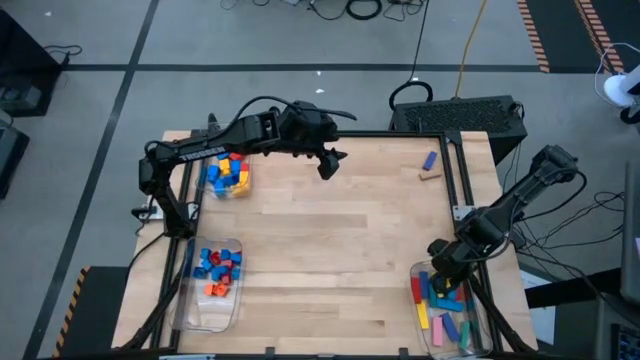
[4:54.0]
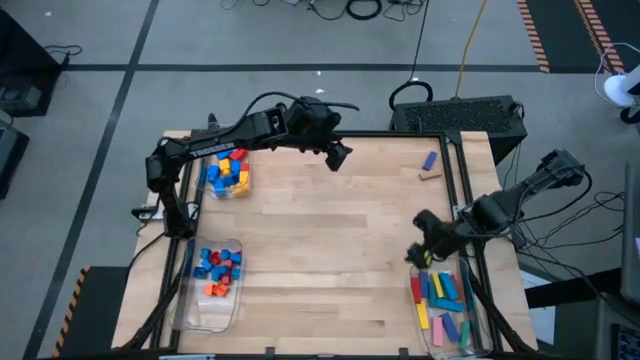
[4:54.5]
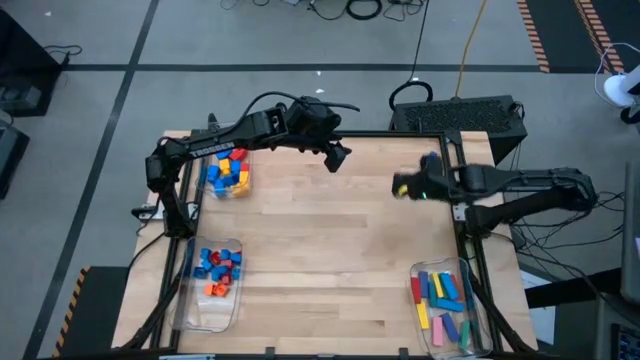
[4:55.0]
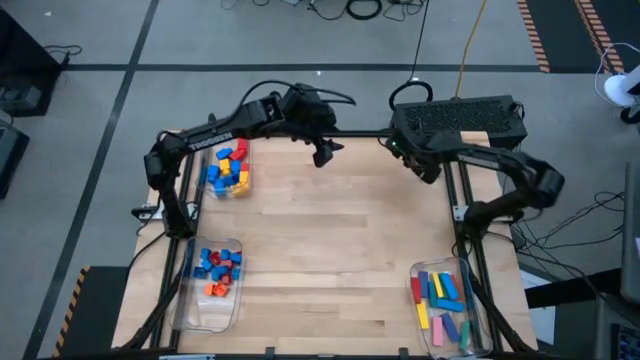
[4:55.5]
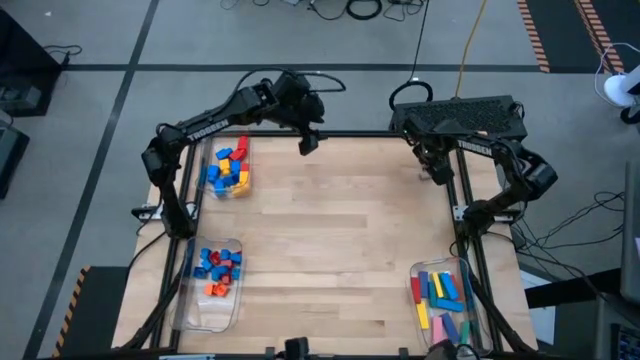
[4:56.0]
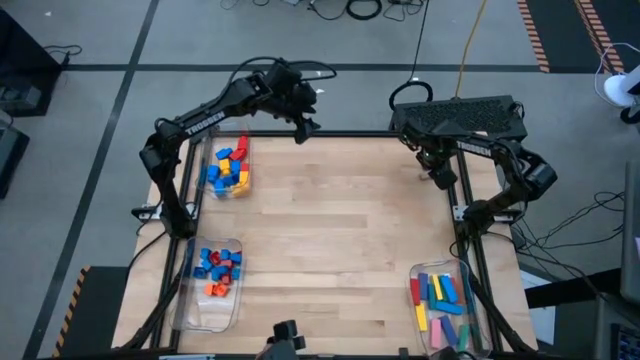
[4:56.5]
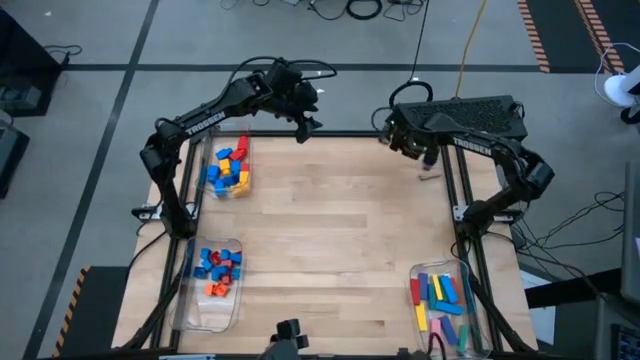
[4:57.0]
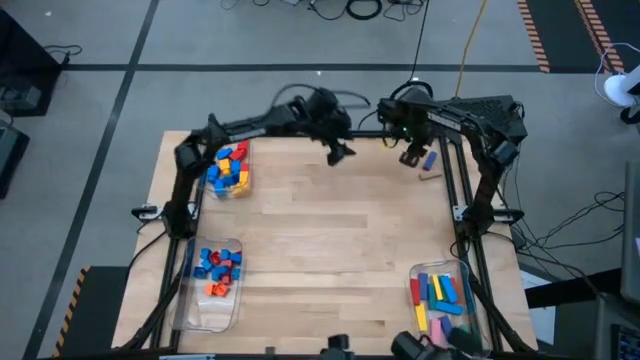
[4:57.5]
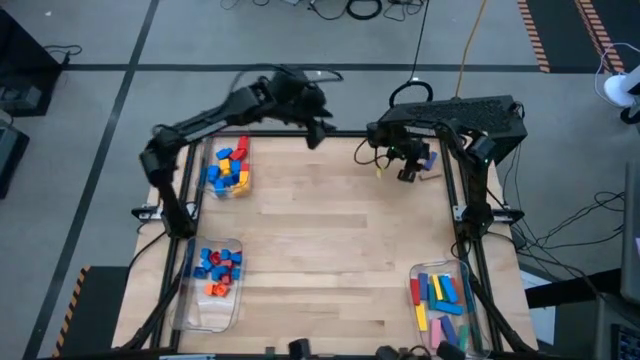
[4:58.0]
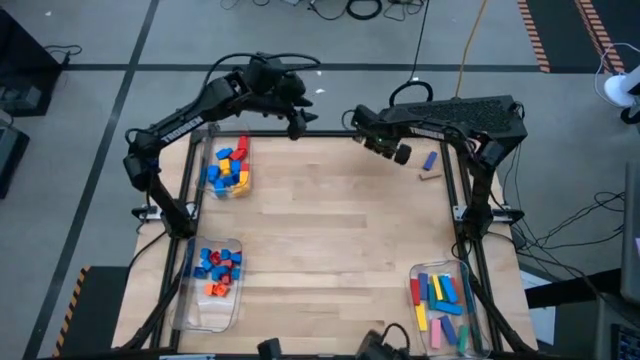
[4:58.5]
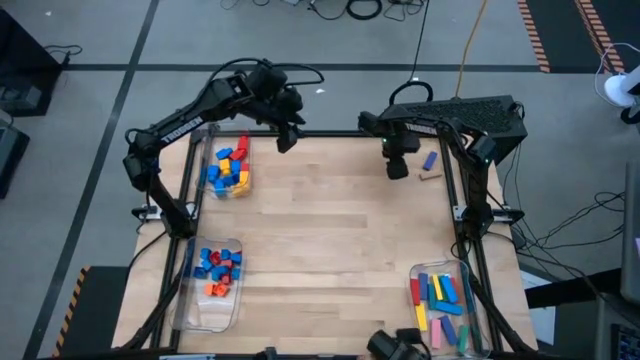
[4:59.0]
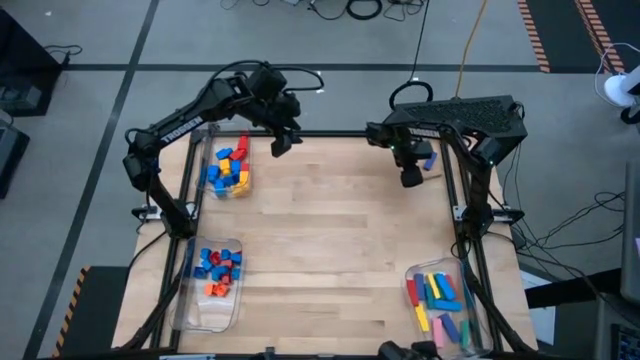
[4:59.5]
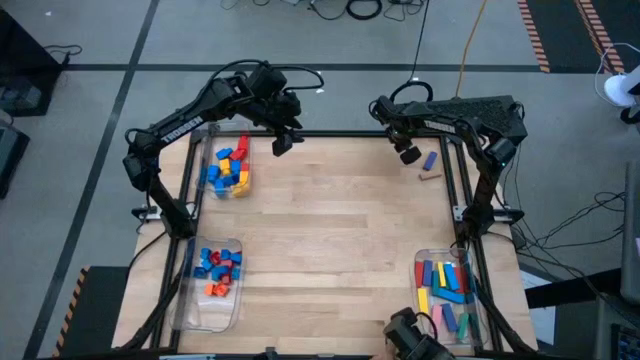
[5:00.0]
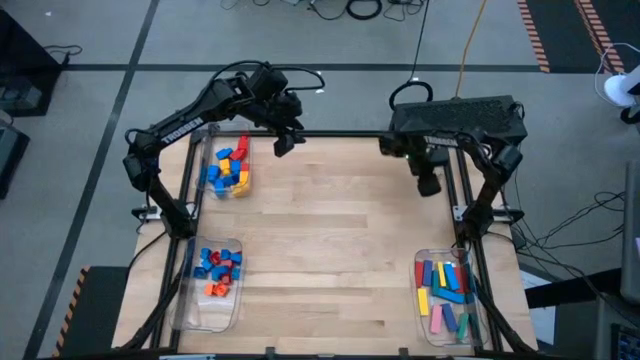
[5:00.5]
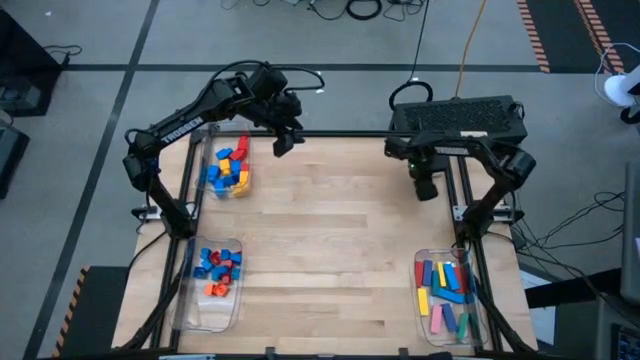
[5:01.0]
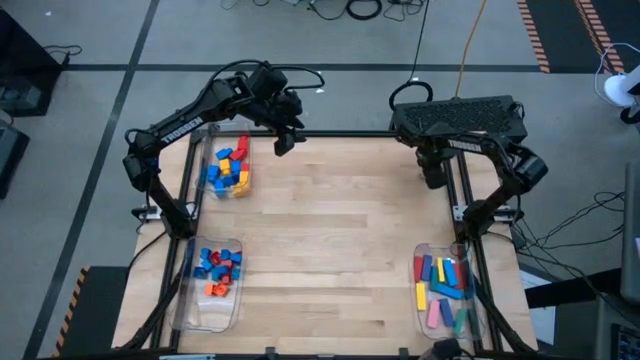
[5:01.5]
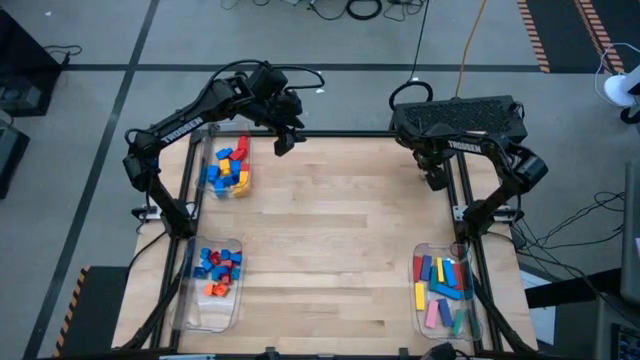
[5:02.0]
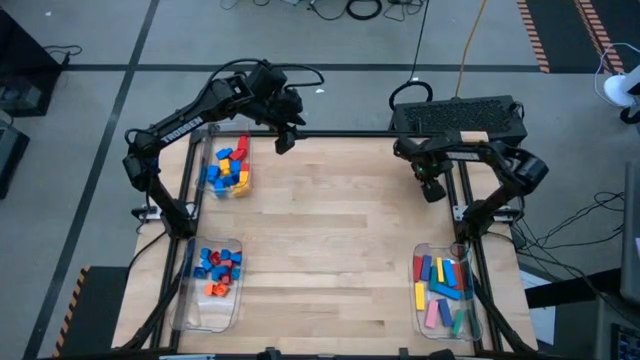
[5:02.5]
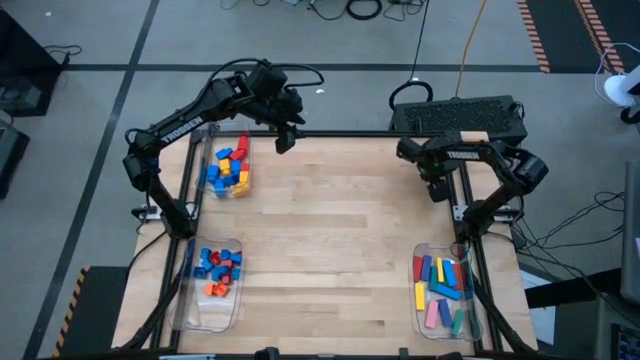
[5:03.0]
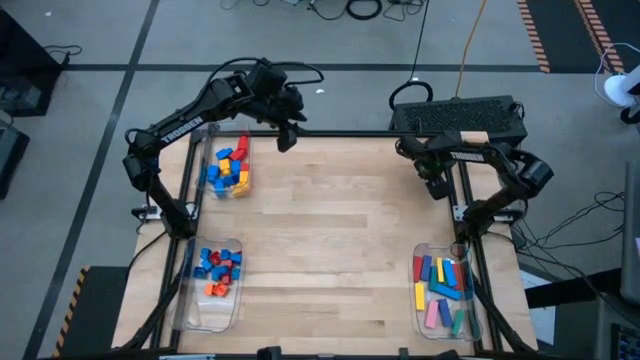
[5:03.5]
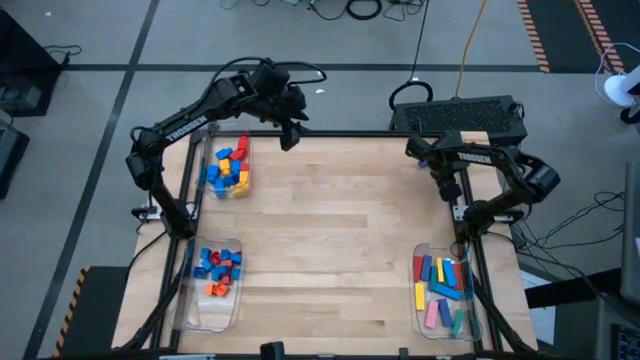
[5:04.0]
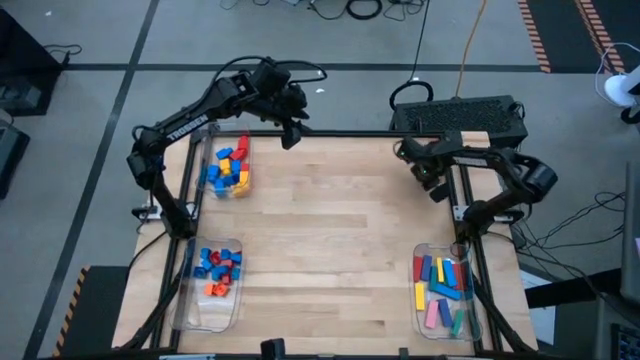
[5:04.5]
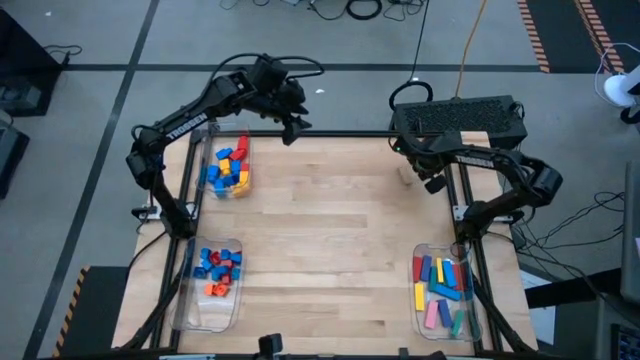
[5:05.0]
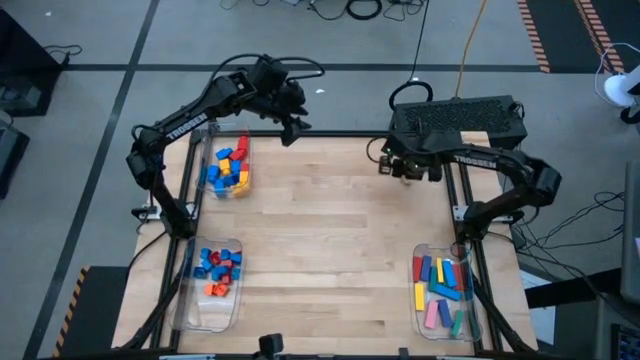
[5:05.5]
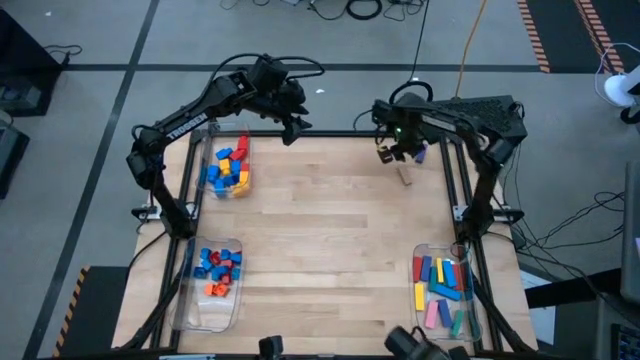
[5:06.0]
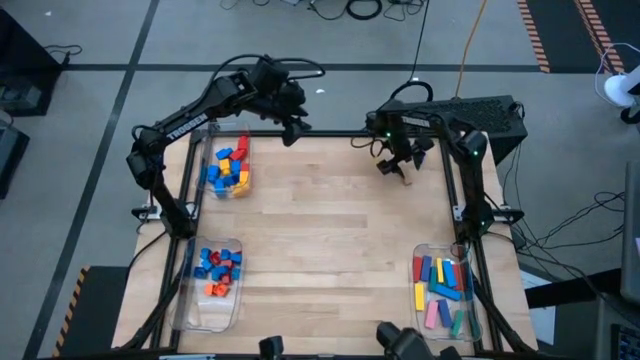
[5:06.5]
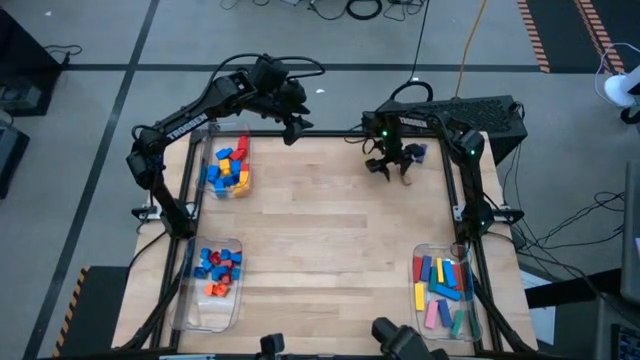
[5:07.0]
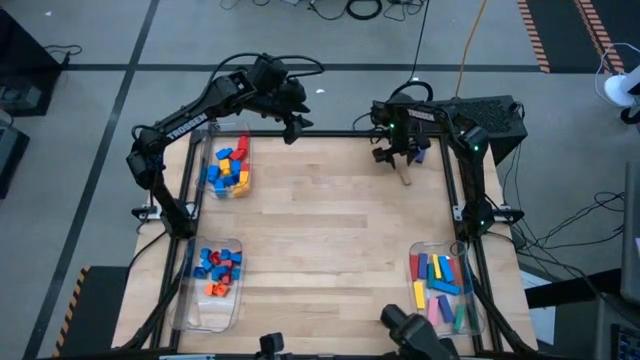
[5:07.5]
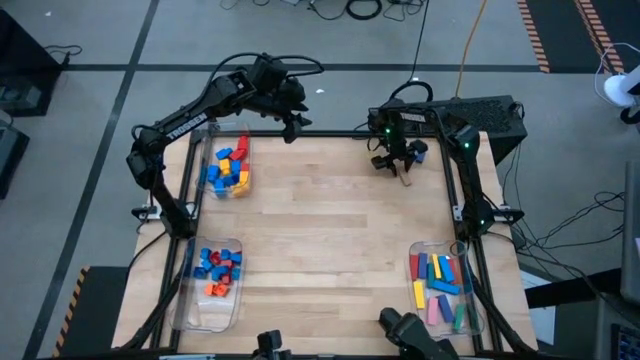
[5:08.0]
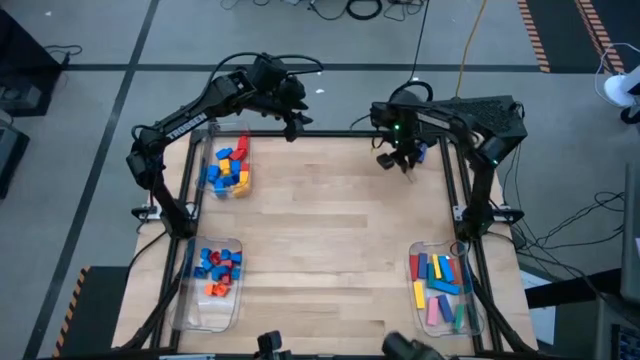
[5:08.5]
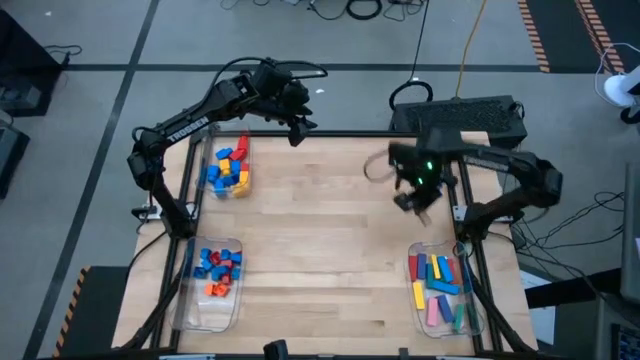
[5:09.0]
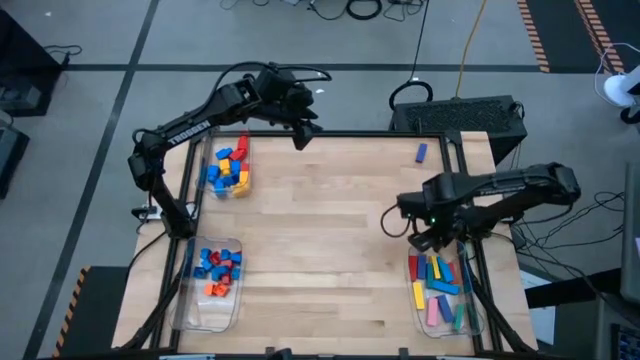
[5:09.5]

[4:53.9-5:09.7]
Task: Sort blocks by size
Put the brown rectangular block into the bottom right transparent bin

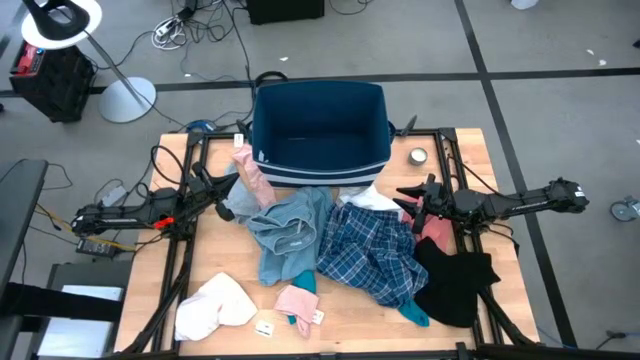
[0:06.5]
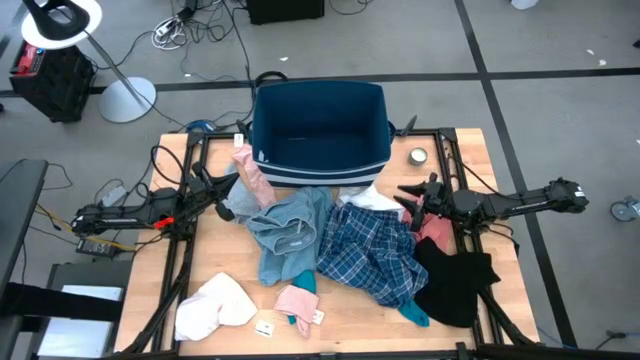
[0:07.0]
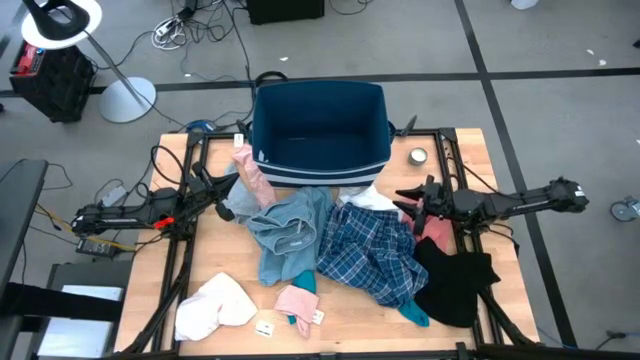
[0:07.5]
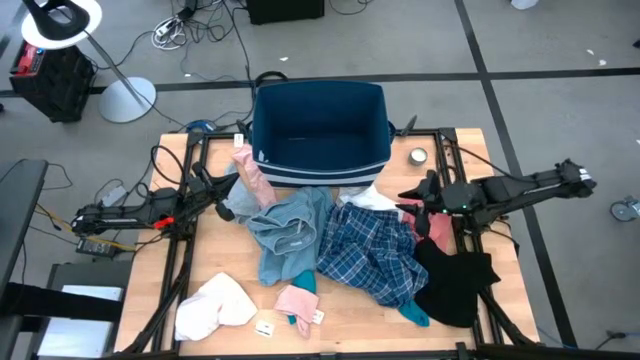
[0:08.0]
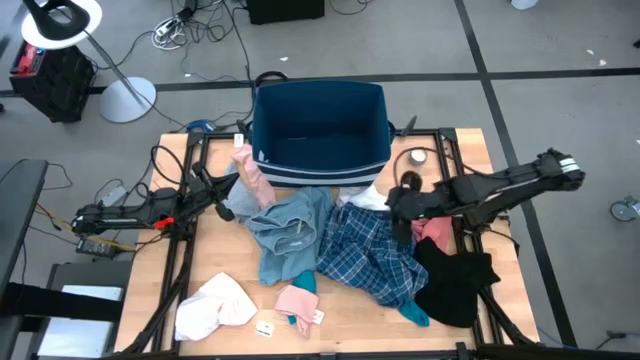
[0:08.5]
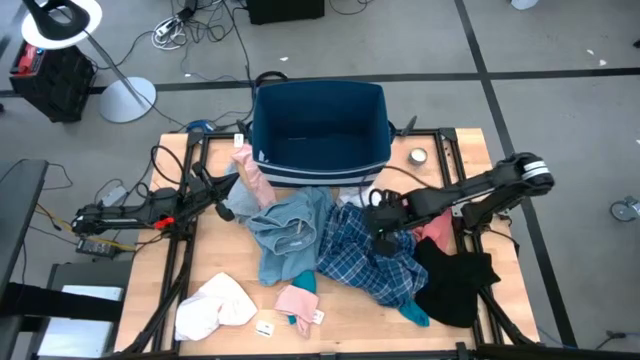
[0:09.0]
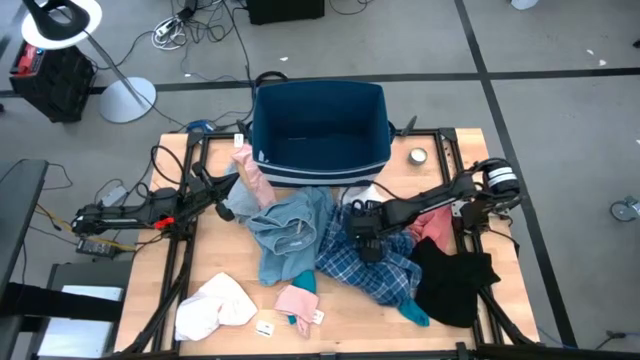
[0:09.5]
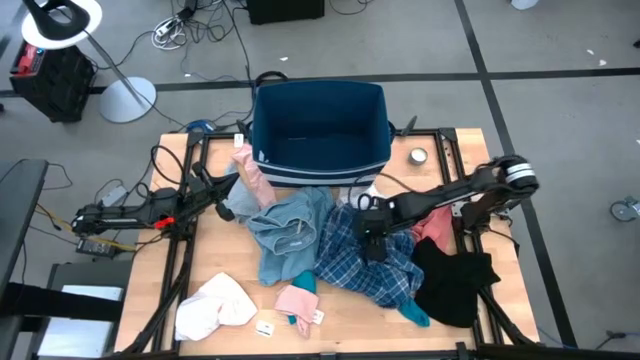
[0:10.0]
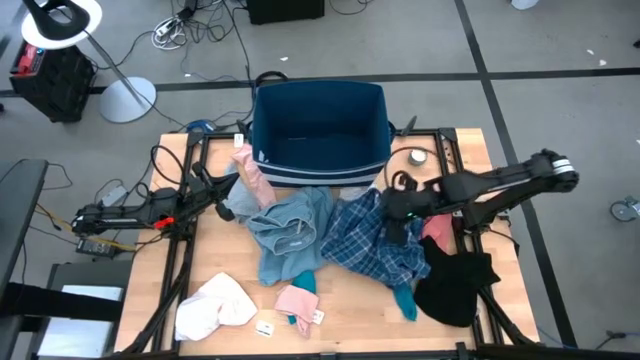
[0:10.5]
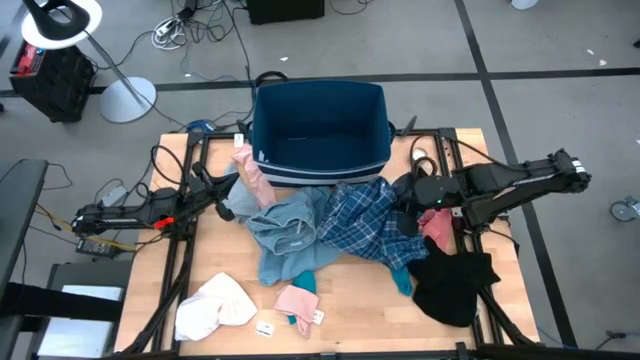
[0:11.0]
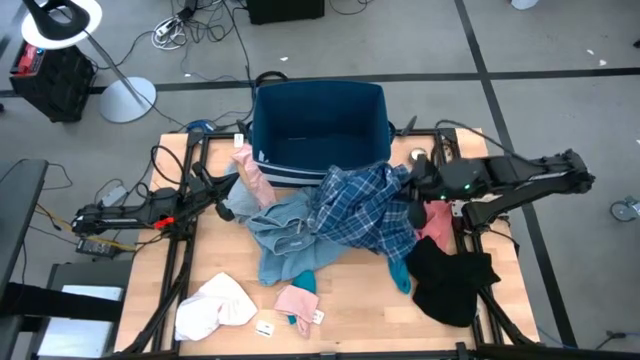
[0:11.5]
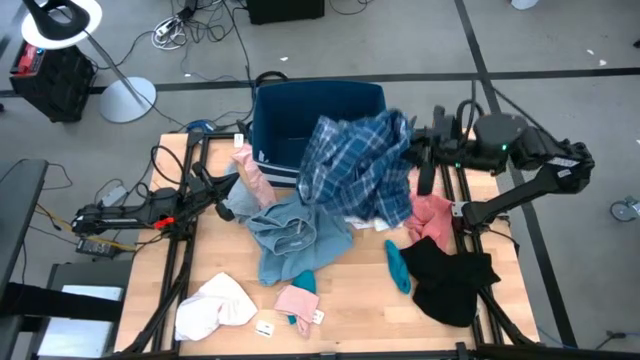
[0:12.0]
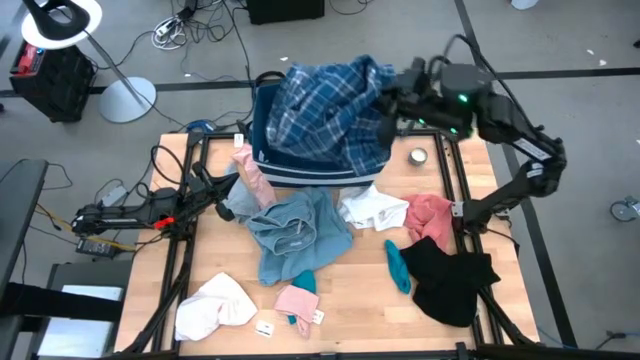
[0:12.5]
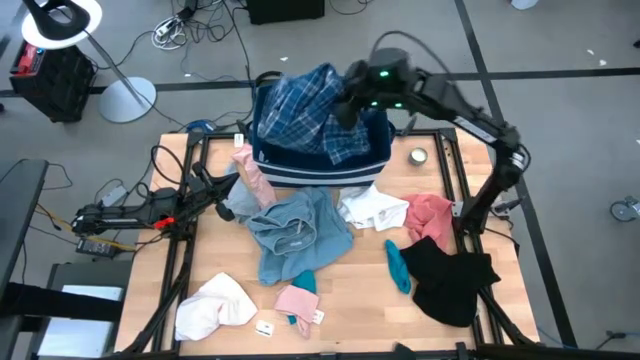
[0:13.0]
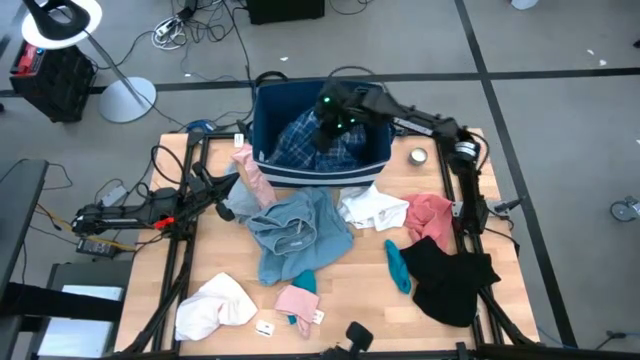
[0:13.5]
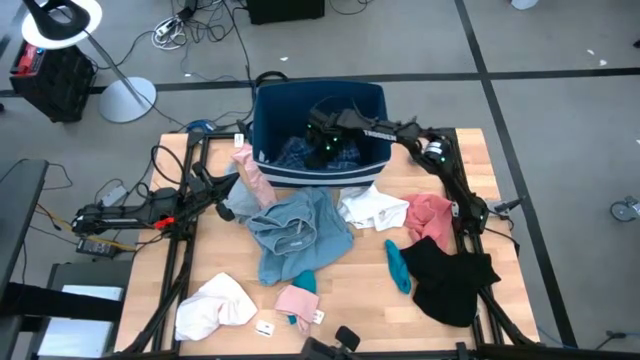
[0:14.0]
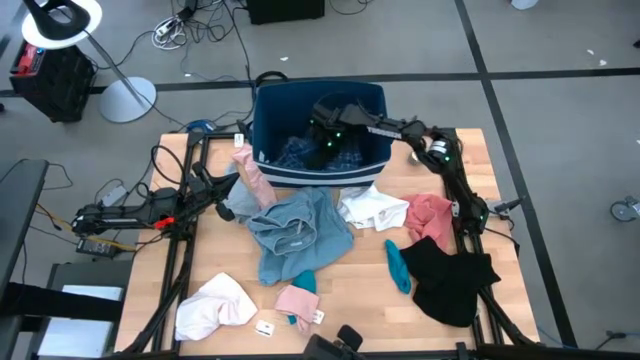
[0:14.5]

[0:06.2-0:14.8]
Task: Sort clothes
Put the blue checkered long-sleeved shirt into the blue laundry bin
